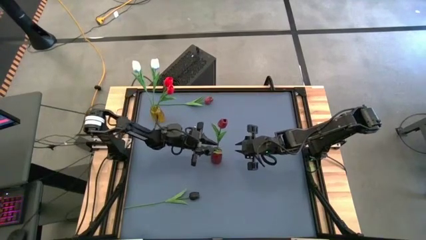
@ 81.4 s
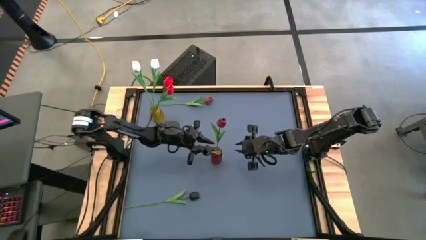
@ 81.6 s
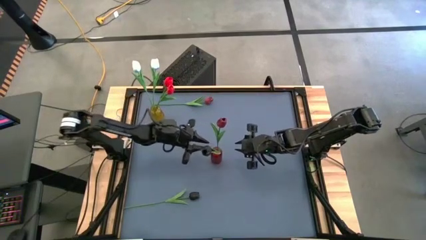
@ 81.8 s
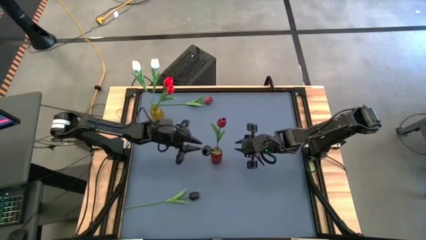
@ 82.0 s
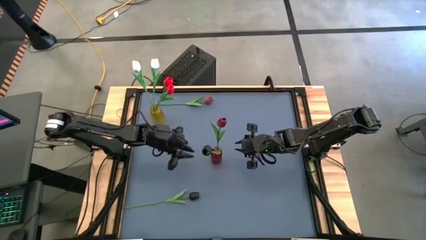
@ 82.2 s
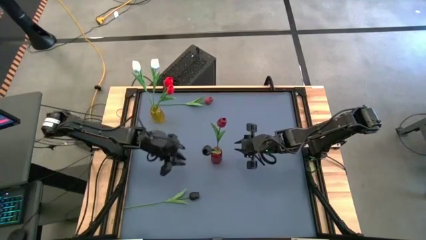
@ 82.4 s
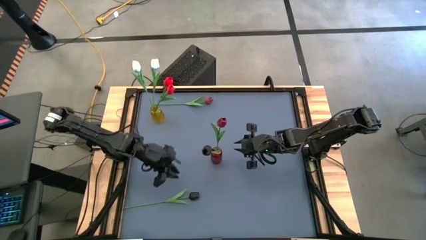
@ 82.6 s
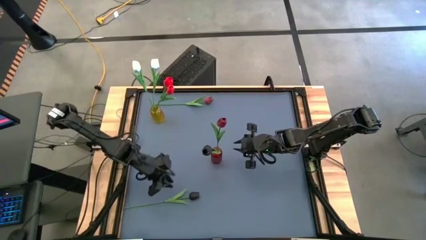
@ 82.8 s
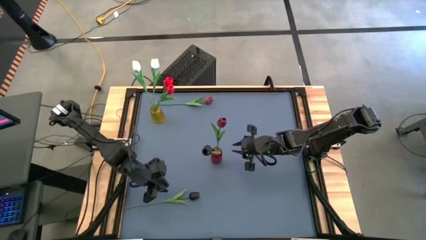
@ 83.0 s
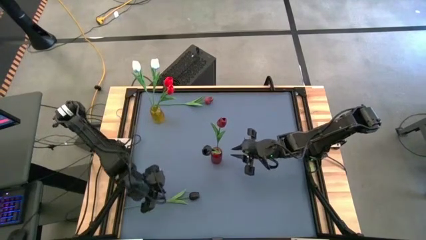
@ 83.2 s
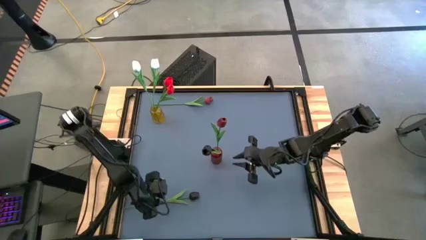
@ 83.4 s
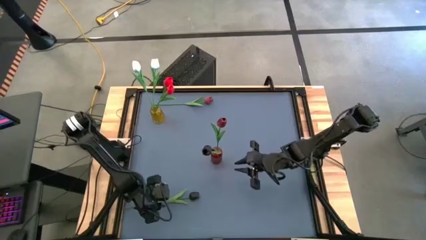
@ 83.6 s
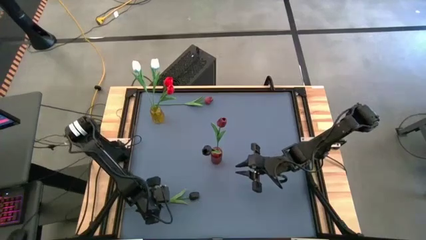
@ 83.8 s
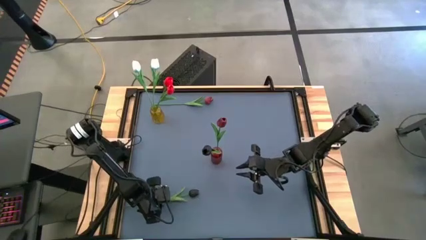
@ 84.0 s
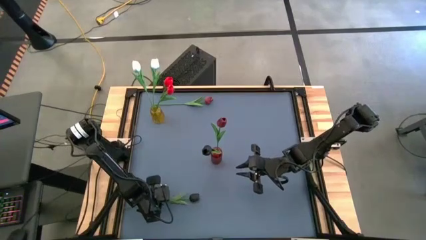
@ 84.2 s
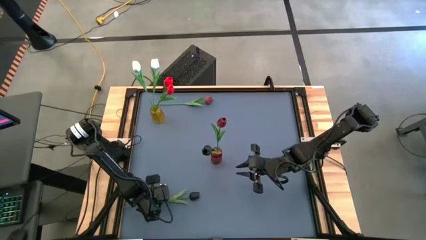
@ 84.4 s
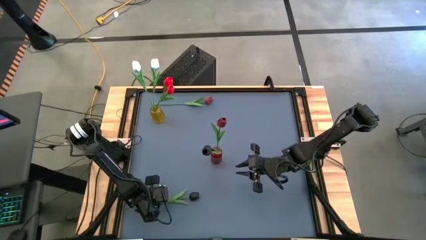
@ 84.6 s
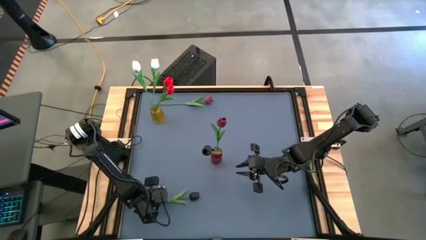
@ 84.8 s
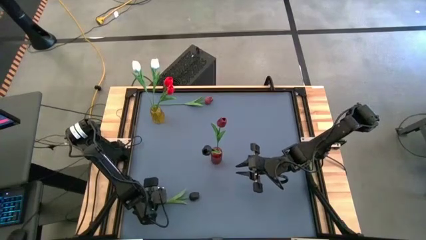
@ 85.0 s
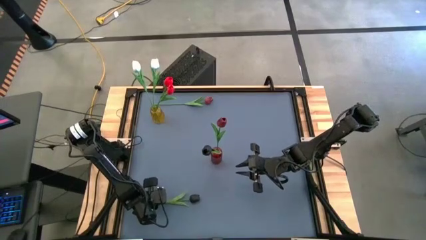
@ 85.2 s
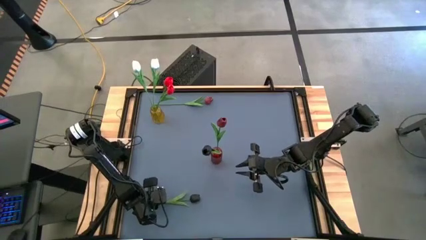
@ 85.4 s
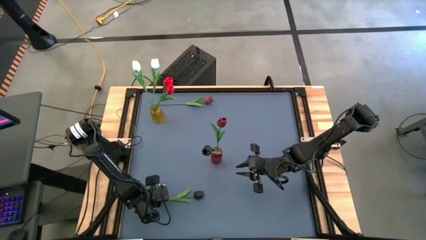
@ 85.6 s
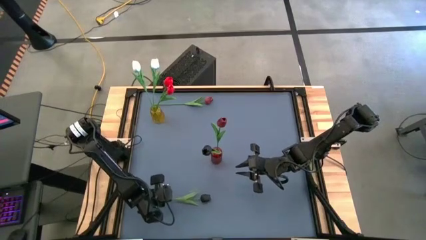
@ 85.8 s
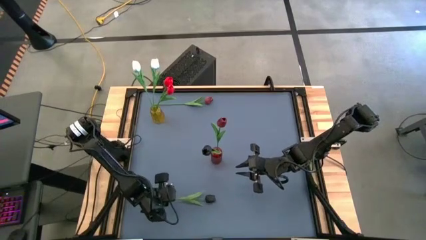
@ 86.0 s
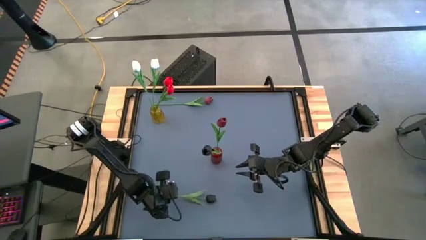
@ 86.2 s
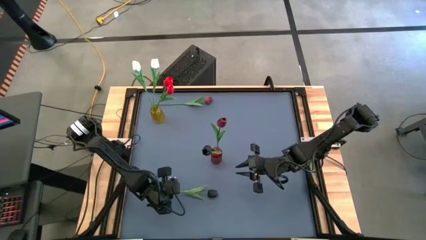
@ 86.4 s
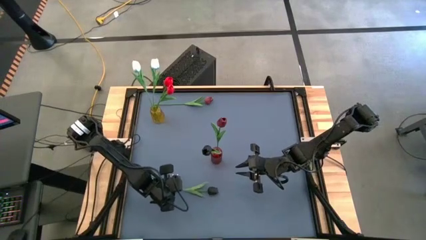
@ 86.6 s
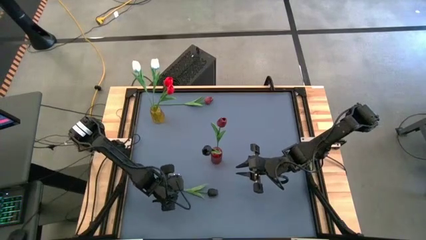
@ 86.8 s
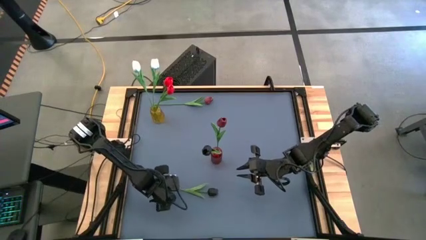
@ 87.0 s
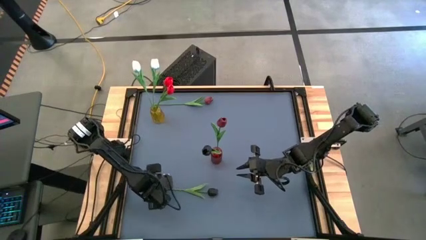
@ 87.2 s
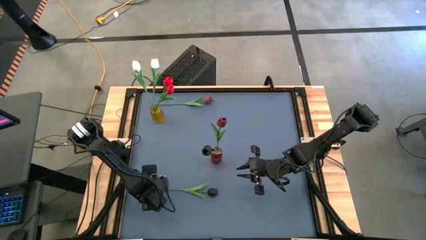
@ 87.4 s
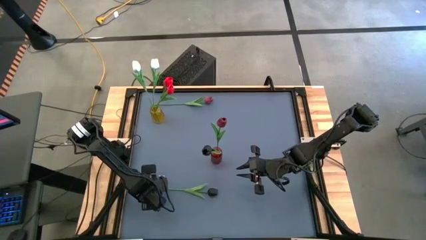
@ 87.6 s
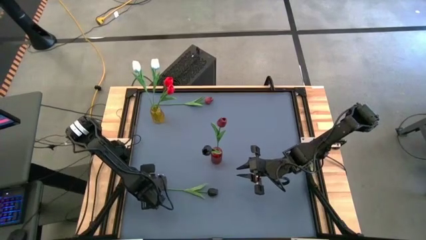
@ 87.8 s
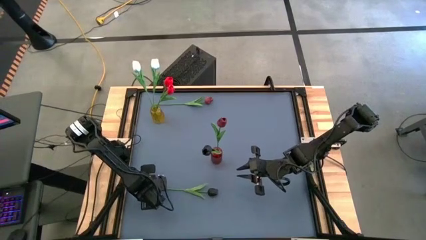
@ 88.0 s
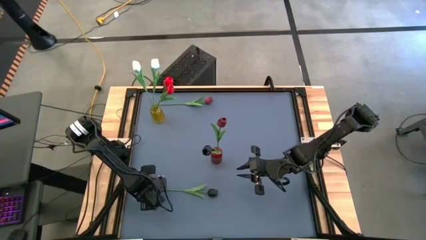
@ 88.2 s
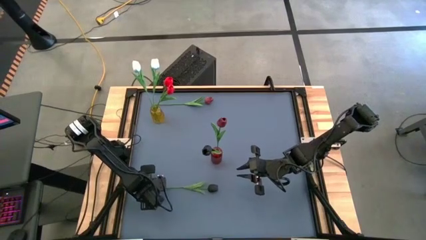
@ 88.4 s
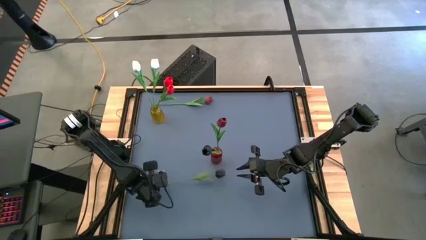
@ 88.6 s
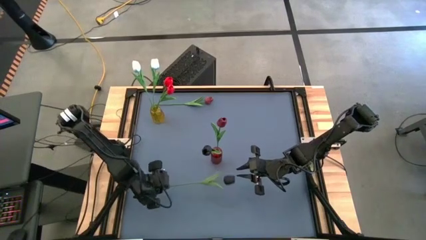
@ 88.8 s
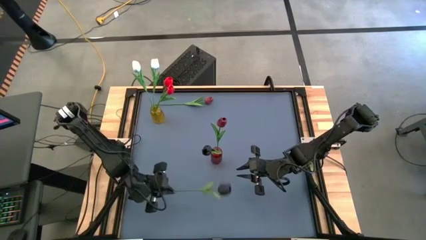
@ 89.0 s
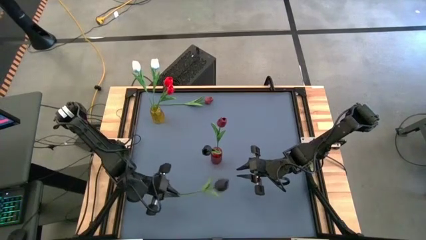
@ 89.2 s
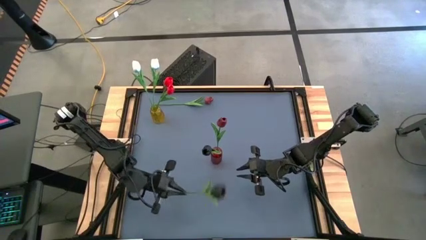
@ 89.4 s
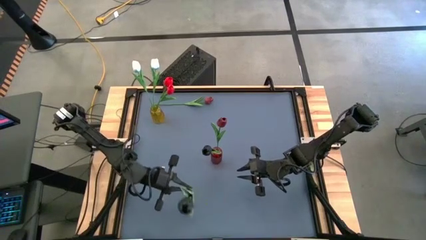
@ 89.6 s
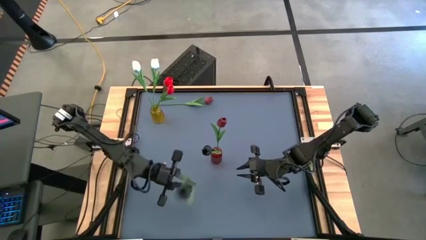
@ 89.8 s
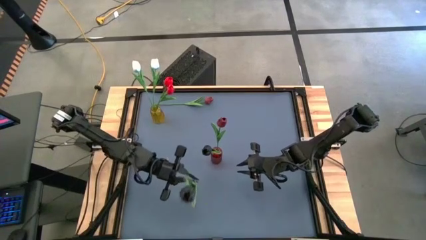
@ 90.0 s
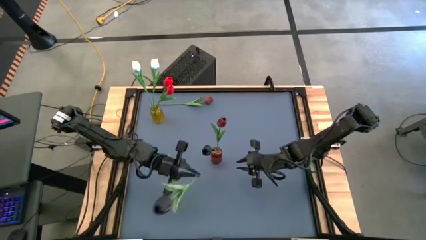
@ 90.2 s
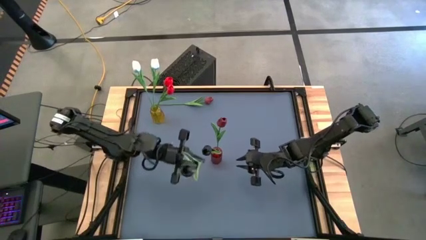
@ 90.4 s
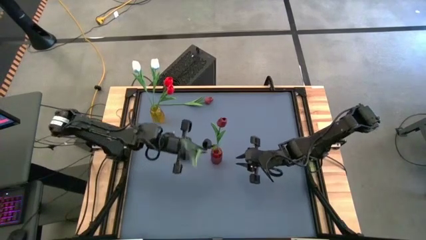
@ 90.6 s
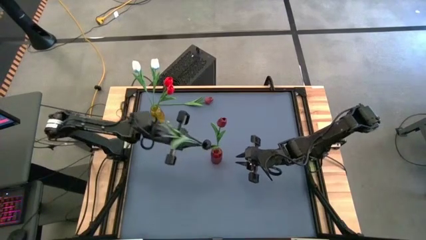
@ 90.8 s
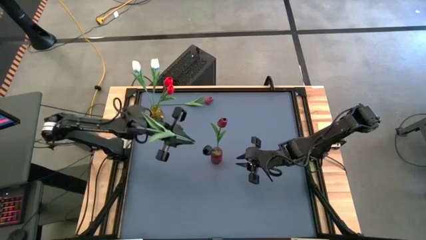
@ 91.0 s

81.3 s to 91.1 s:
Task: Sort flowers into vase by color
Put the black tulip into the red vase

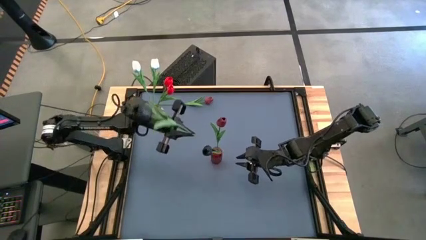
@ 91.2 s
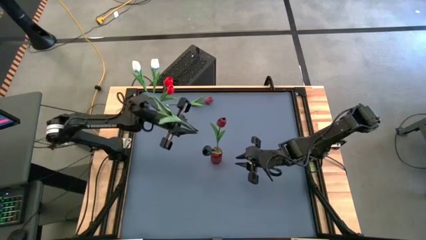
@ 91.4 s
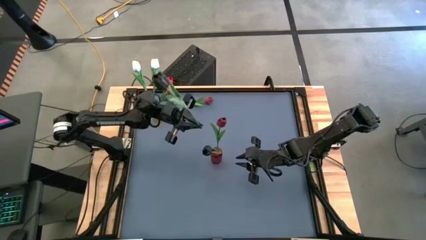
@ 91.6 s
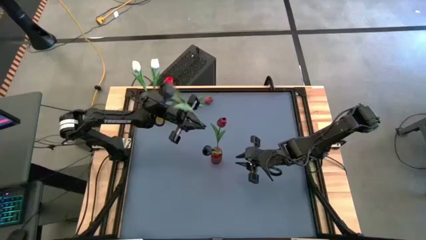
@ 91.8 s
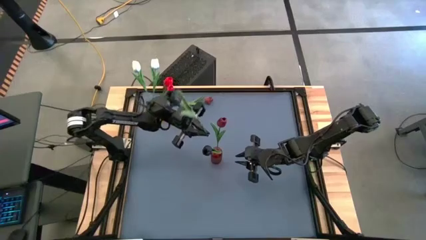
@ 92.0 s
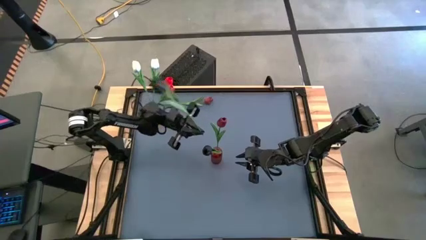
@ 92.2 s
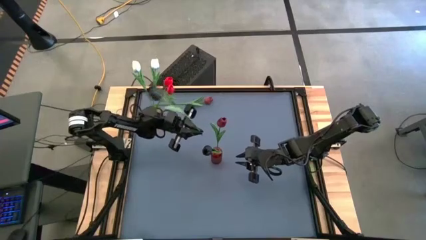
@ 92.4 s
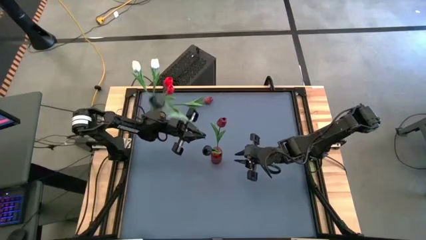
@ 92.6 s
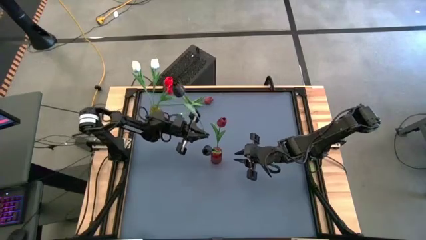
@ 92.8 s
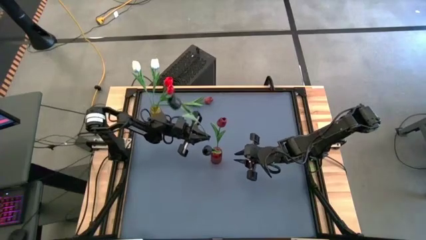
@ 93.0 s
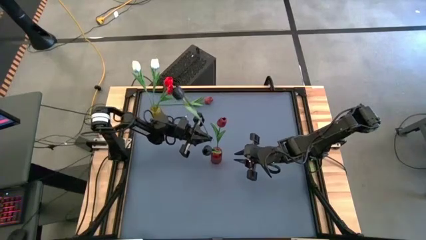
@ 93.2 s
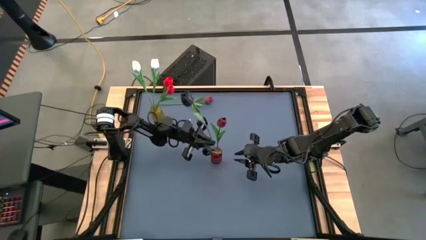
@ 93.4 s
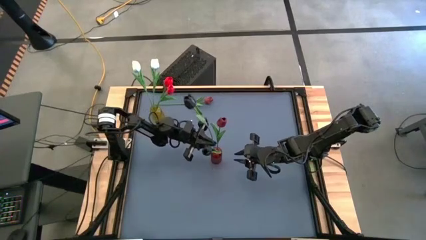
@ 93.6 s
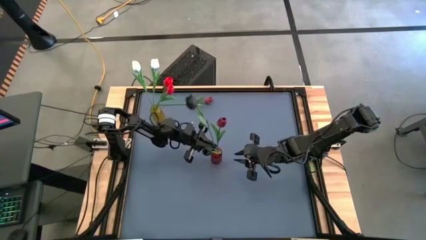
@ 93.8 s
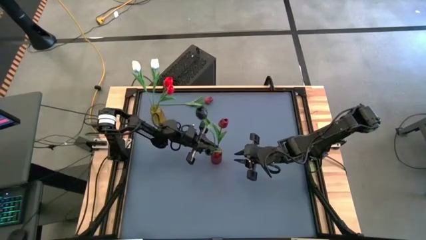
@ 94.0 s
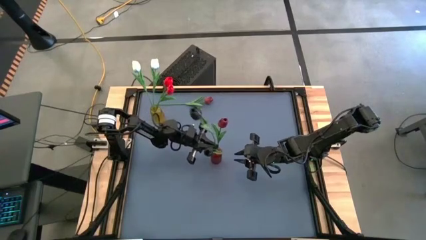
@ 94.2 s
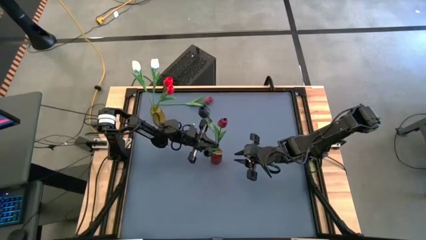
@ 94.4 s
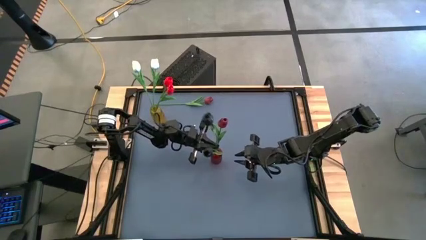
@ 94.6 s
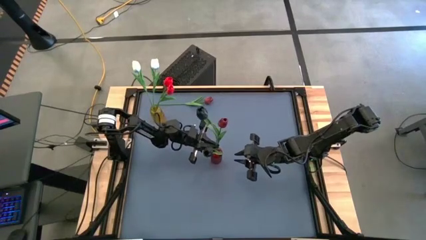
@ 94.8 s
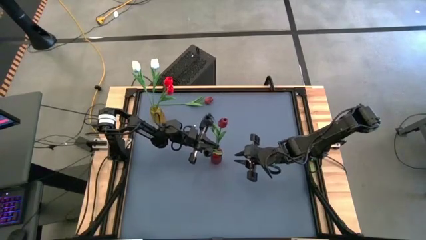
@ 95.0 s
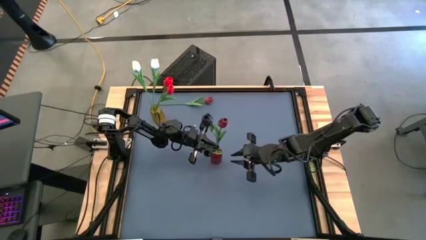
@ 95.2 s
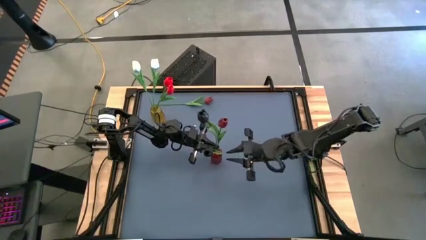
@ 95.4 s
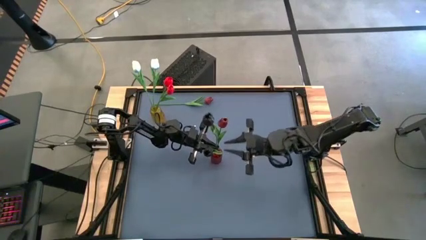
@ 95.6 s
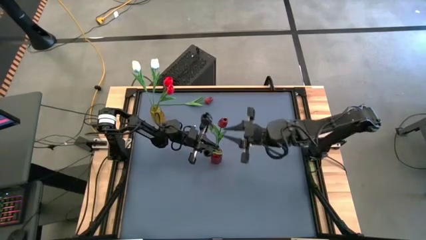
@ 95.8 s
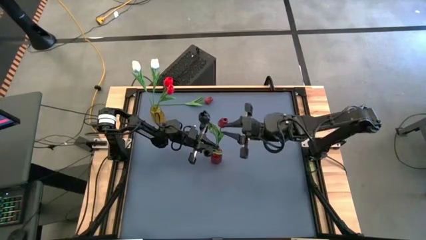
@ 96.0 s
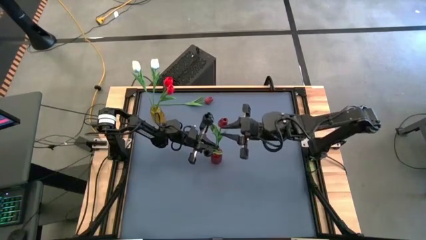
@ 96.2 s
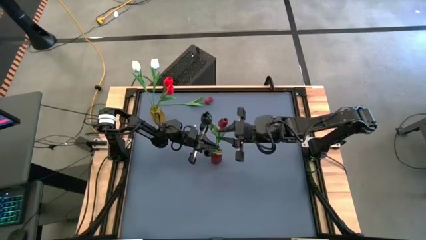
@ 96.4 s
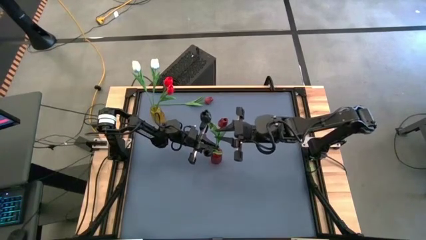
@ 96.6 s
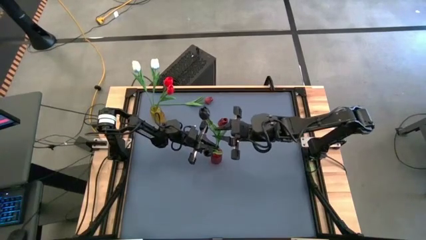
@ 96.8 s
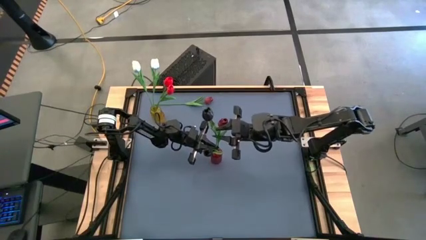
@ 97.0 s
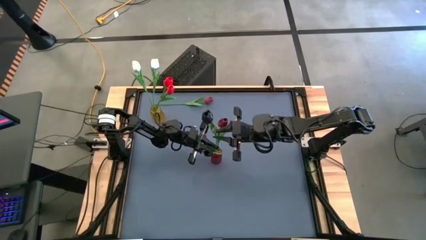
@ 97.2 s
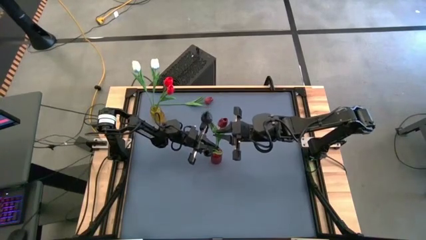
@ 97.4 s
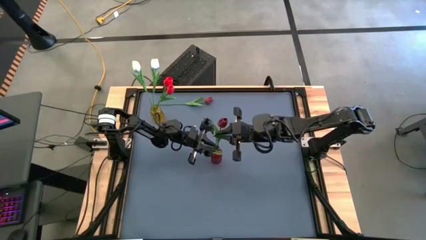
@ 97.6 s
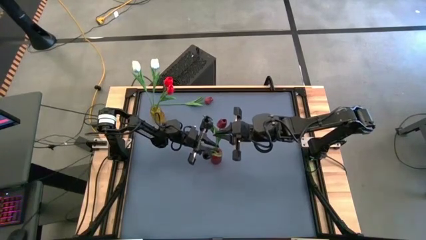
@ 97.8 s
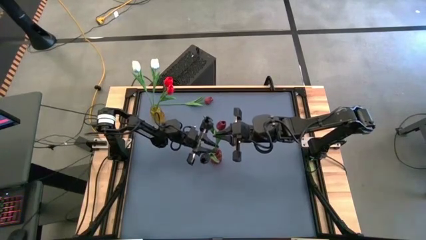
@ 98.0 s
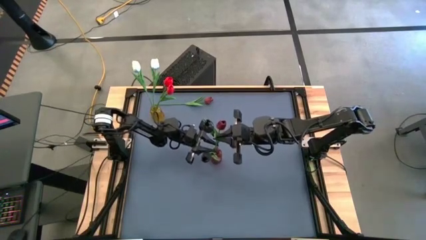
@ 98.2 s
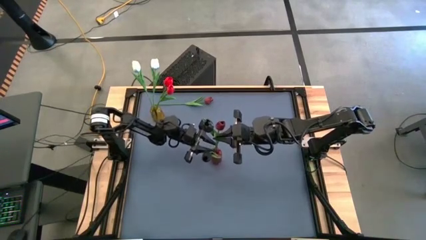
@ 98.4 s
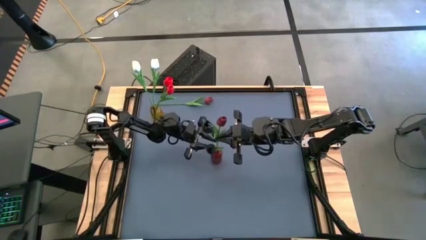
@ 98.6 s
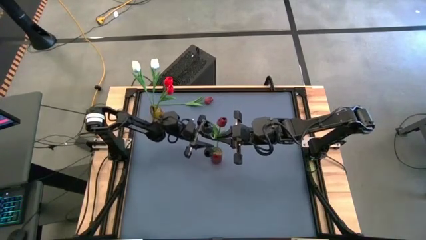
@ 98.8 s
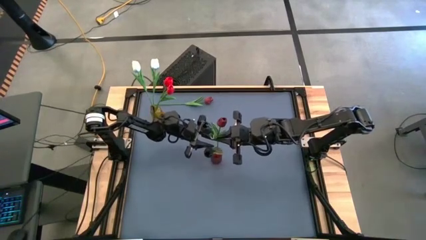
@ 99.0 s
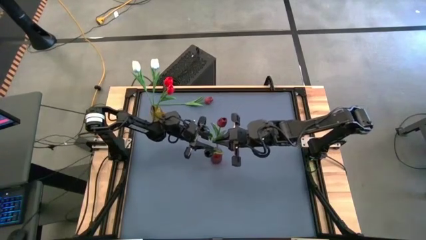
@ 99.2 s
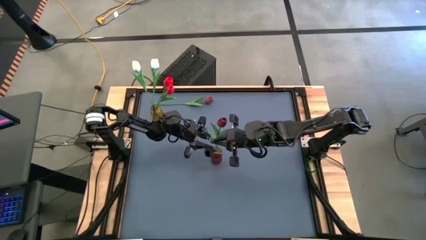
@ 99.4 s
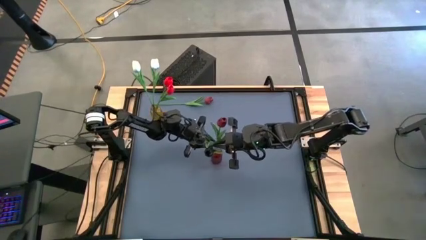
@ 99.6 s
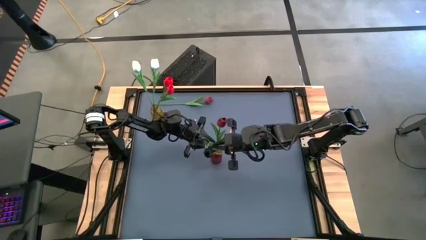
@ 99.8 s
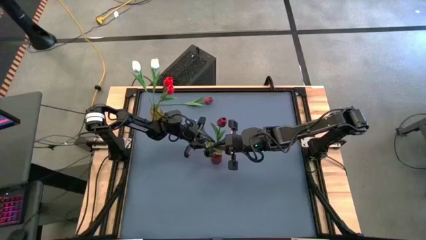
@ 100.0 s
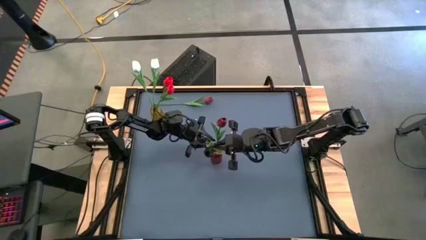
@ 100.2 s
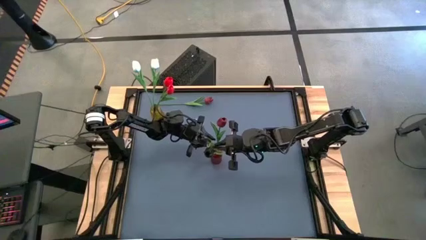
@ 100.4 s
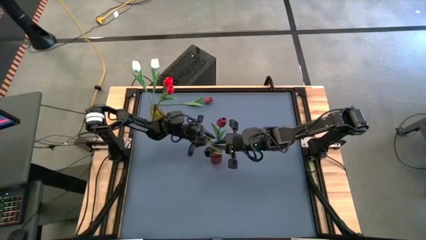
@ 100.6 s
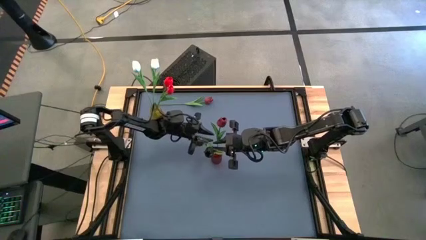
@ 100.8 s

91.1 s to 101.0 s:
Put the black tulip into the red vase
